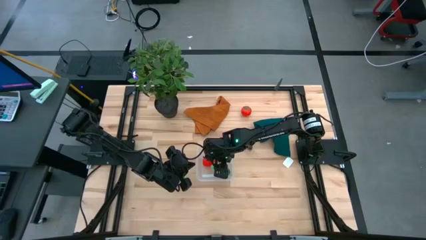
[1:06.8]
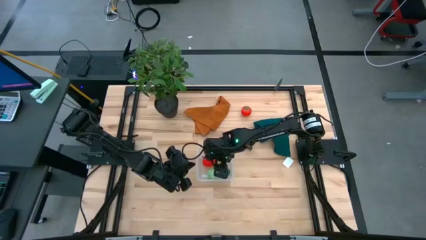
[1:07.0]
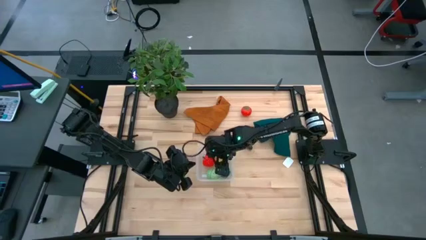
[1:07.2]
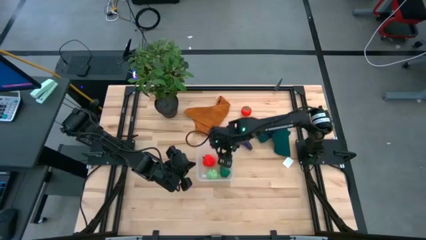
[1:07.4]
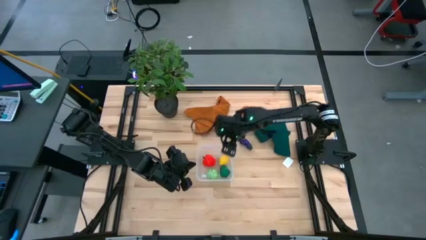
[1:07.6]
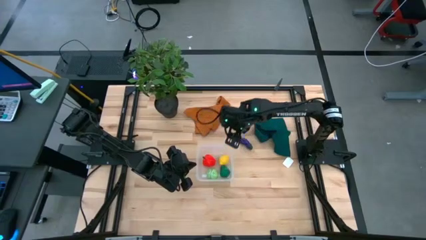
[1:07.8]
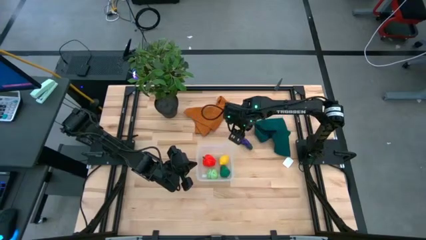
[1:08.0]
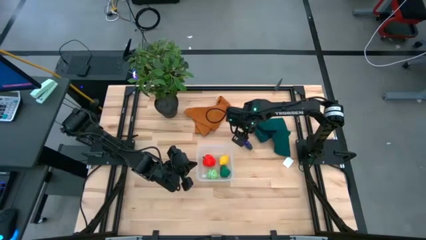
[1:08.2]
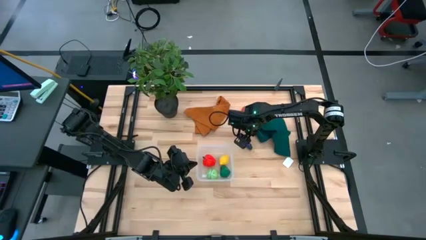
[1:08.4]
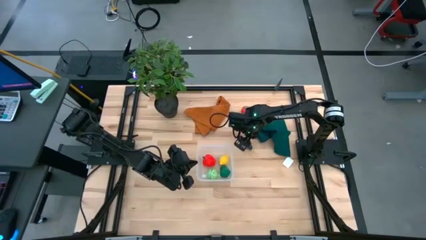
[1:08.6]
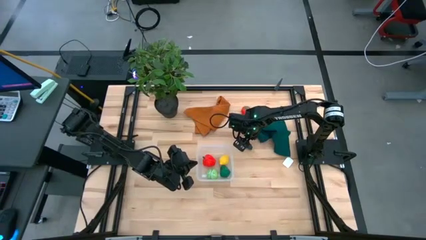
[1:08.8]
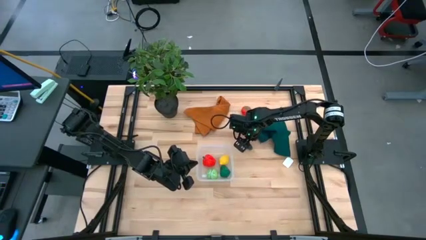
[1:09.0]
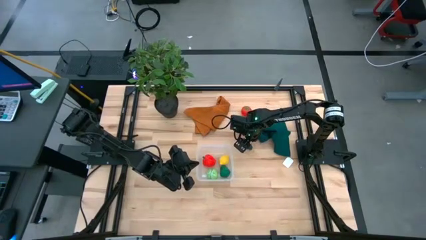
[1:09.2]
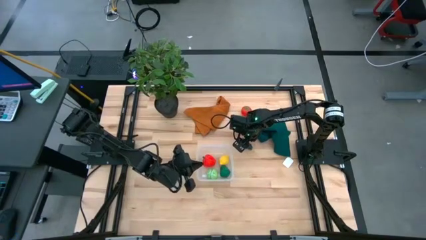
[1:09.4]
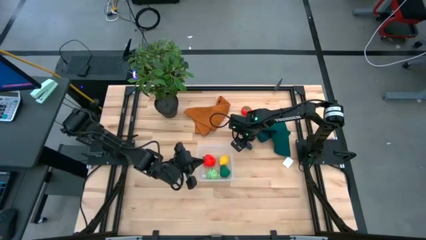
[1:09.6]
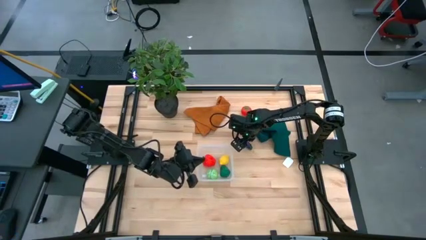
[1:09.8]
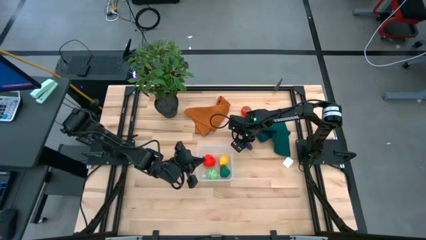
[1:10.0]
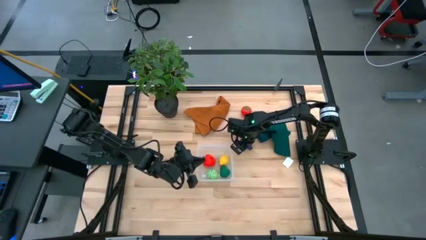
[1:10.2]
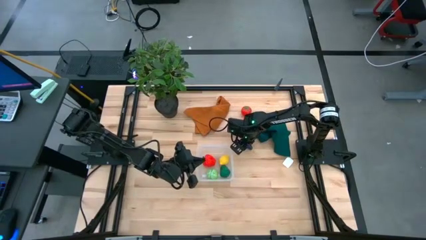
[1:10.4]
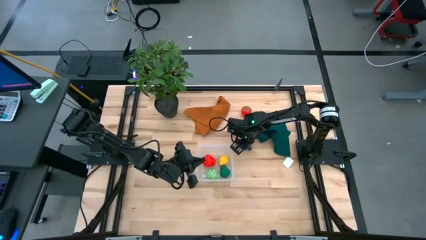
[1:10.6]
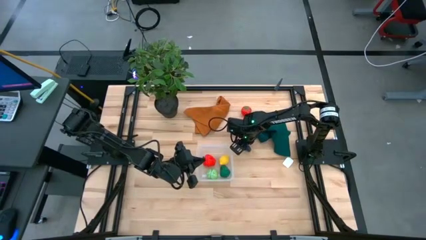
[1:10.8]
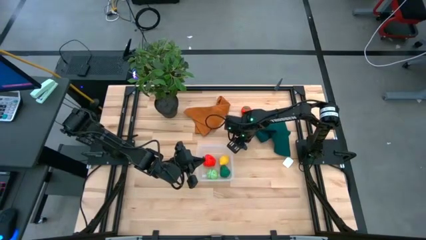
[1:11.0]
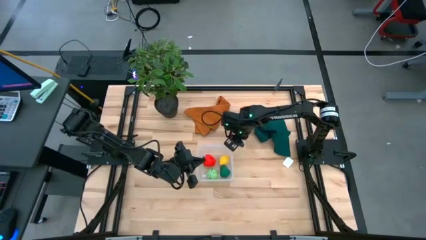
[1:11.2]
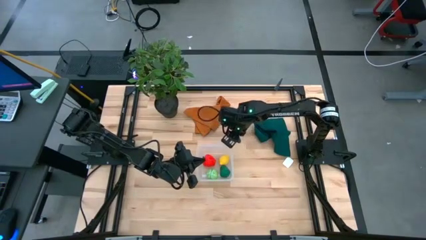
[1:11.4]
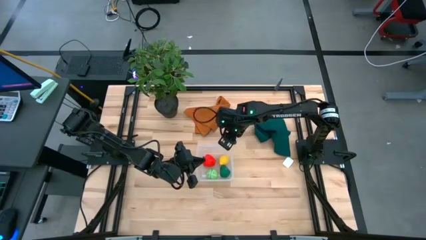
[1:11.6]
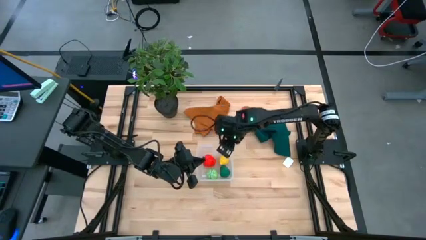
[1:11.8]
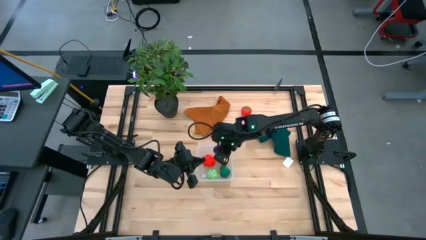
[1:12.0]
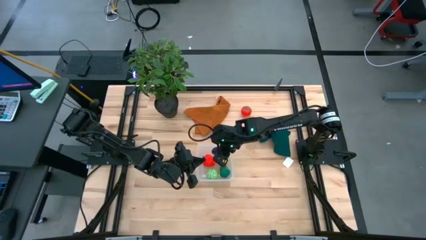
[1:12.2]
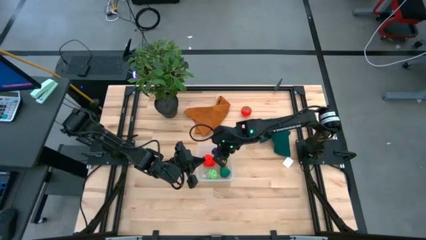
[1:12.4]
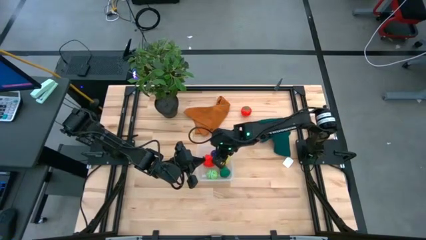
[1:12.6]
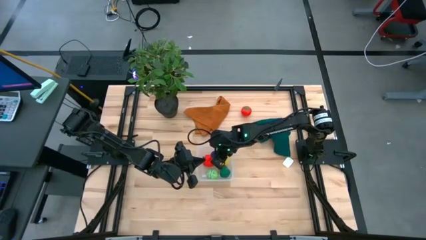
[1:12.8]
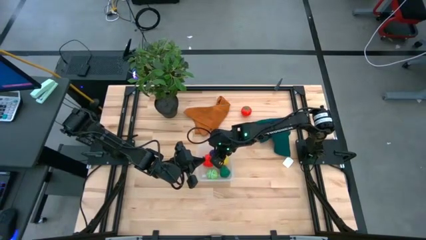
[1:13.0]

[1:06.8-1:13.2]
Task: Pick and placing Produce into tupperware
Put the eggplant into the transparent bin

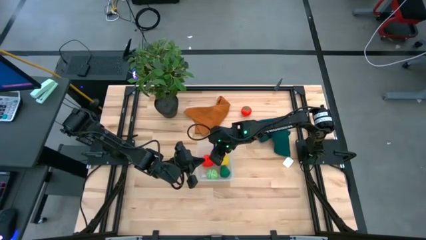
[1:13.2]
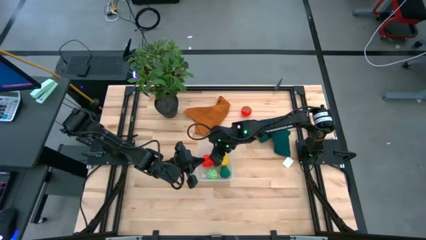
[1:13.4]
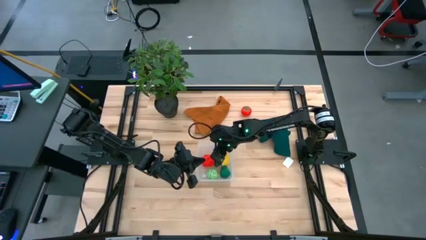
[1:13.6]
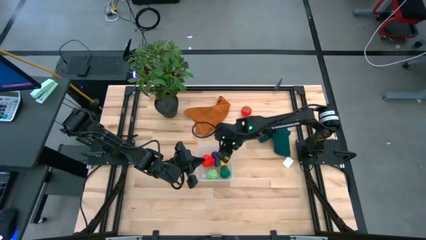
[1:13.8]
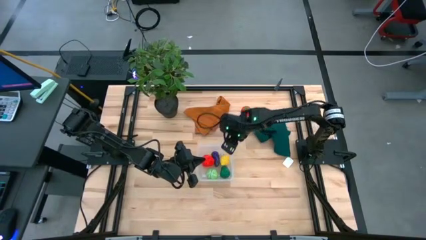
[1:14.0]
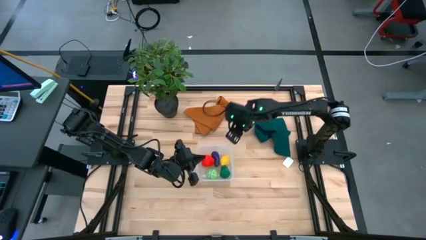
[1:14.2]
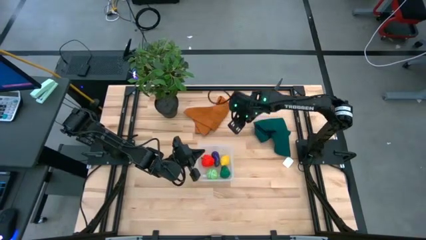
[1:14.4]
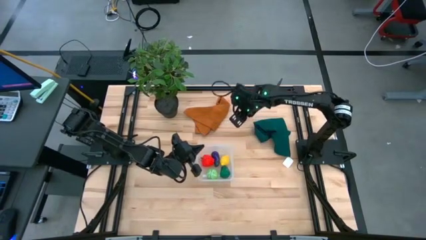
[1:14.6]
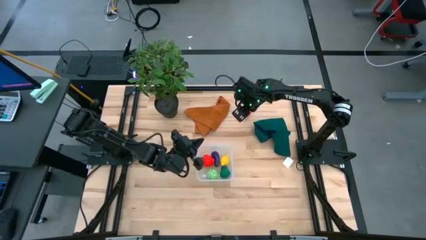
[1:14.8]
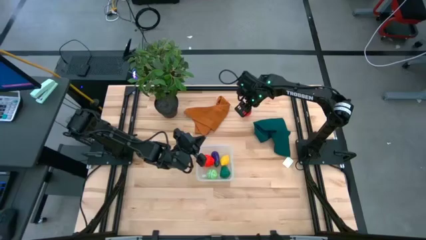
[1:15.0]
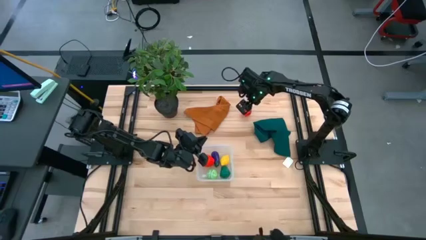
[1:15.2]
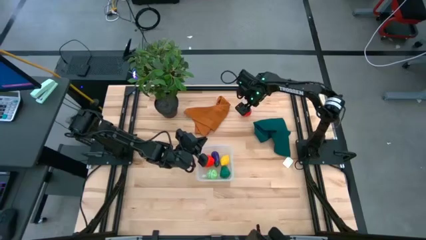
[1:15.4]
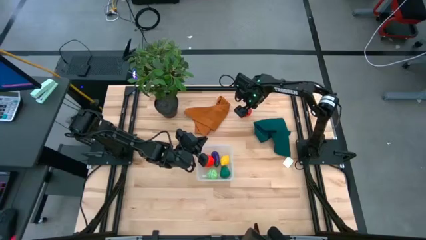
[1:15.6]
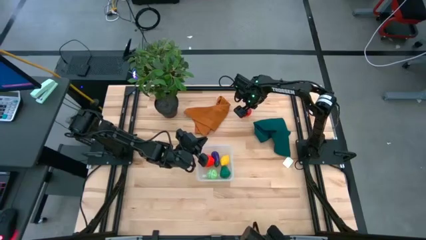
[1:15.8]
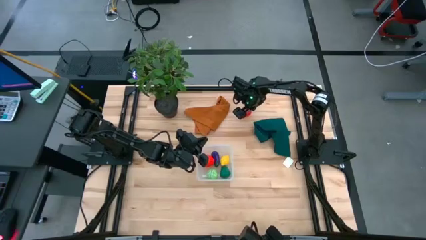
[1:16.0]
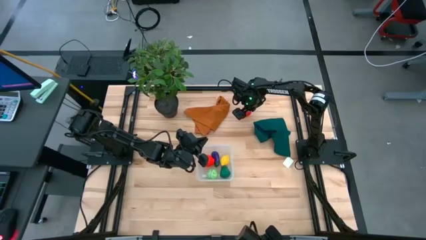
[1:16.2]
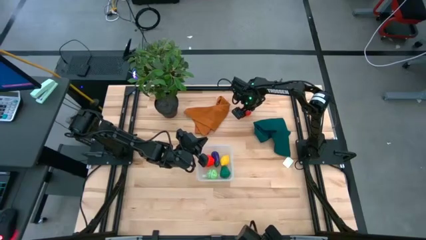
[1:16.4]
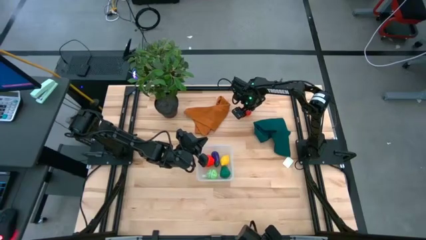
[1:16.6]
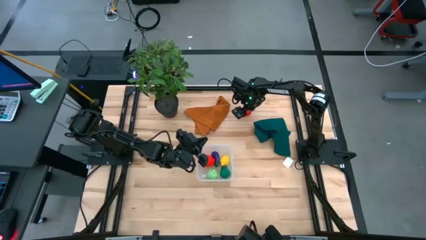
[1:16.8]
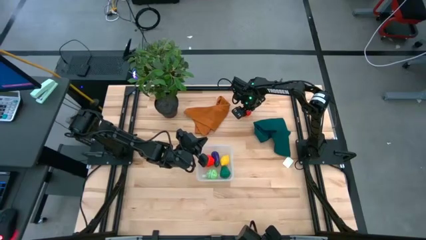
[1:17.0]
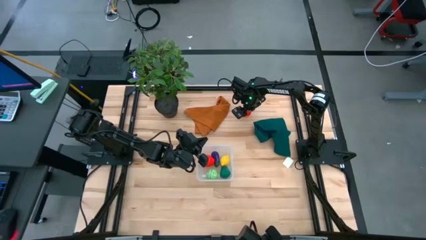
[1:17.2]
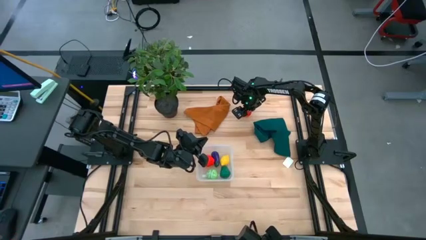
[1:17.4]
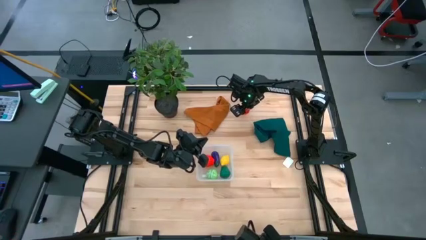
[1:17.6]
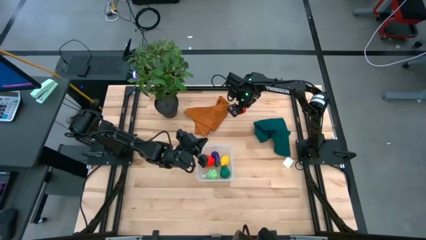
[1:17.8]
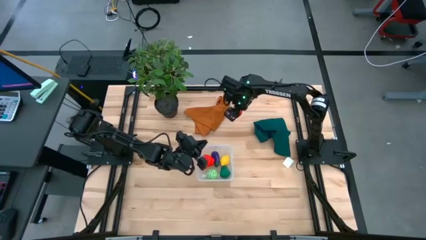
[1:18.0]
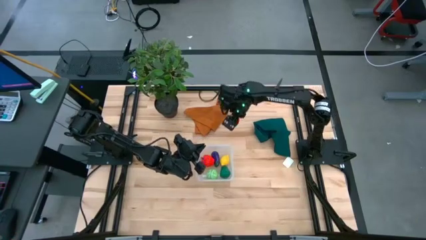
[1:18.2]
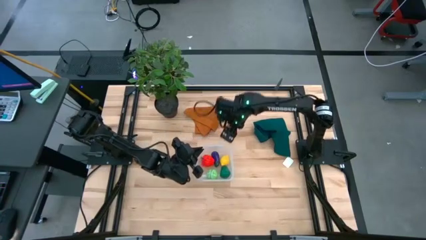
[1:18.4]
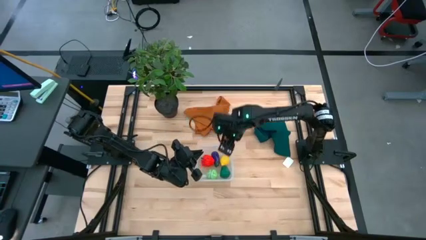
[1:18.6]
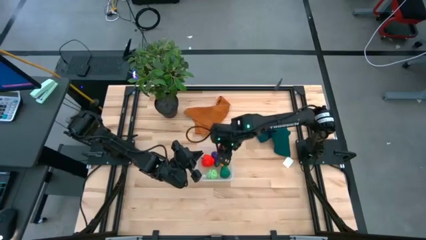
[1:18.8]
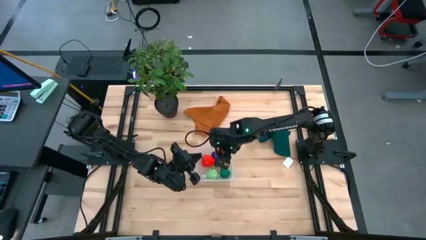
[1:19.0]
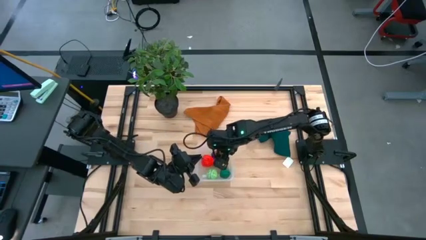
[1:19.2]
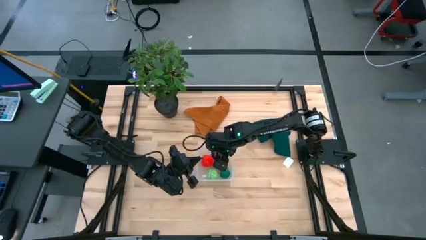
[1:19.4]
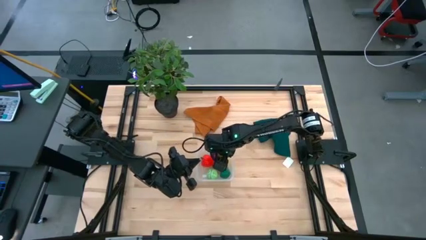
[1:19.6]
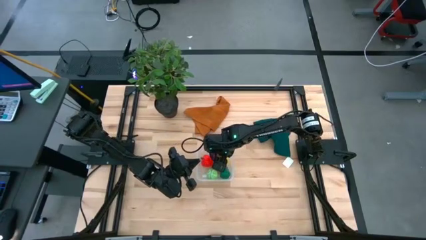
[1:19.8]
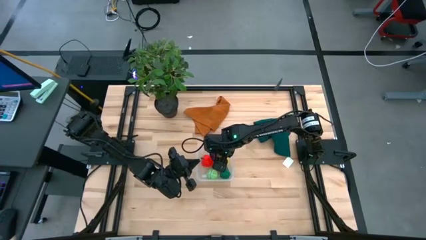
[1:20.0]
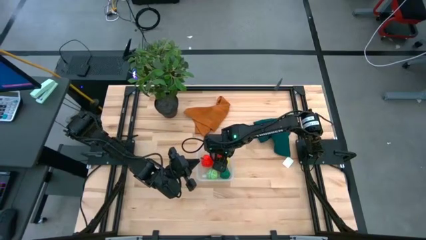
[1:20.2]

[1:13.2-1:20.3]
Put the tomato into the transparent bin

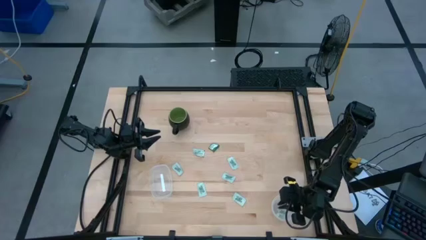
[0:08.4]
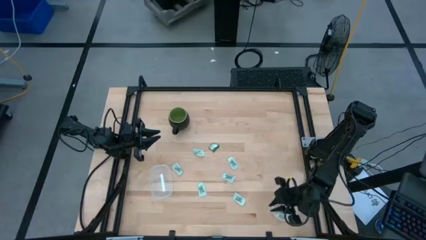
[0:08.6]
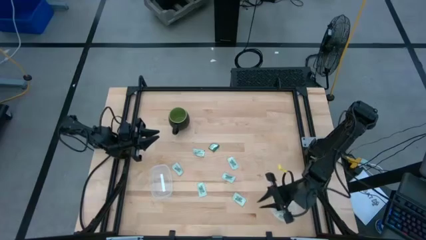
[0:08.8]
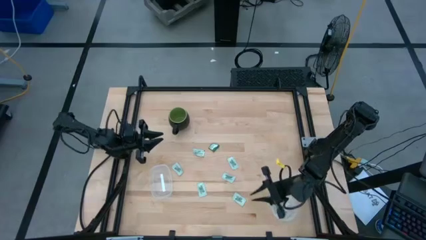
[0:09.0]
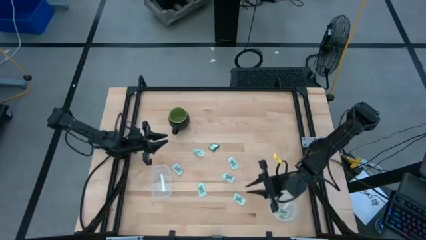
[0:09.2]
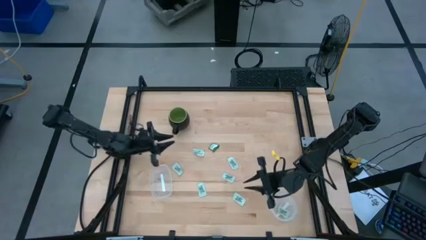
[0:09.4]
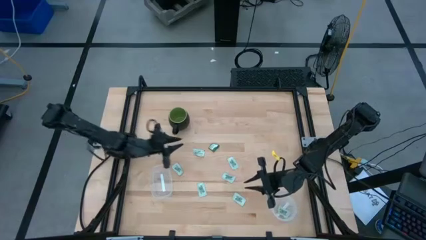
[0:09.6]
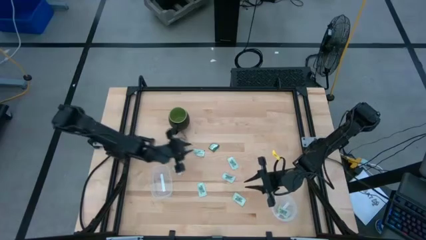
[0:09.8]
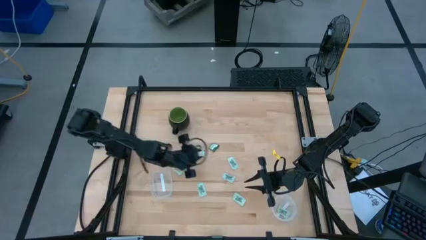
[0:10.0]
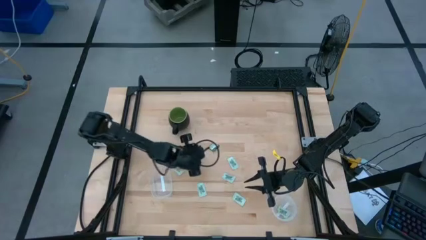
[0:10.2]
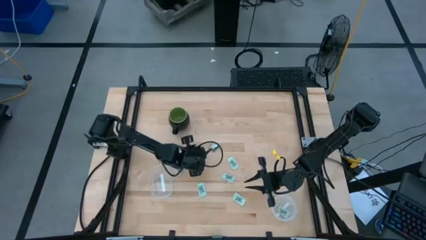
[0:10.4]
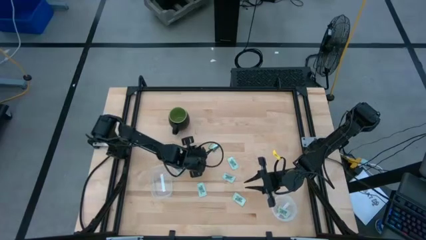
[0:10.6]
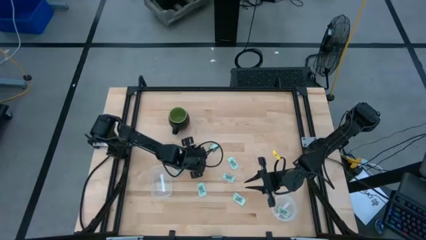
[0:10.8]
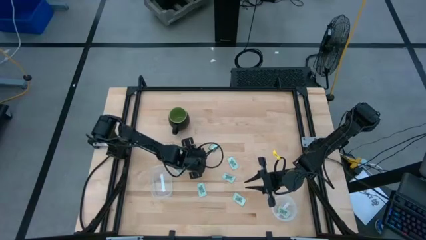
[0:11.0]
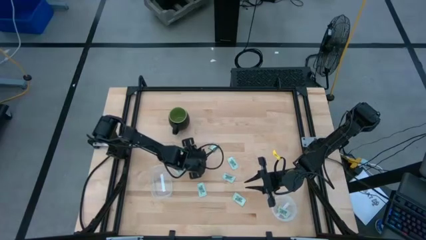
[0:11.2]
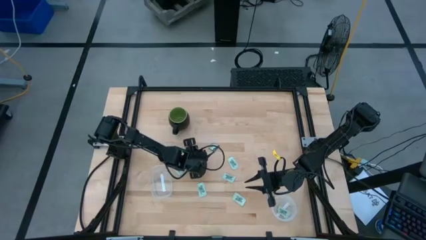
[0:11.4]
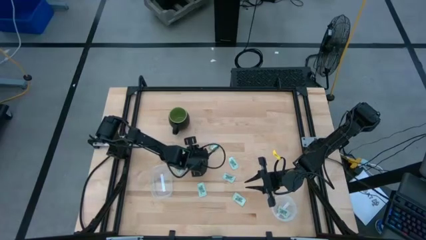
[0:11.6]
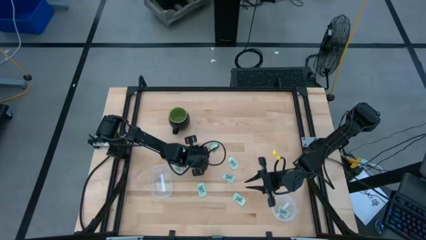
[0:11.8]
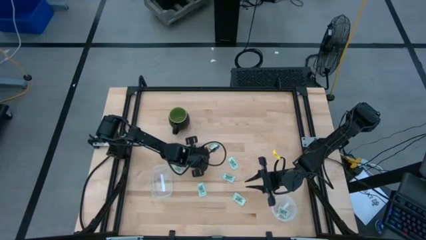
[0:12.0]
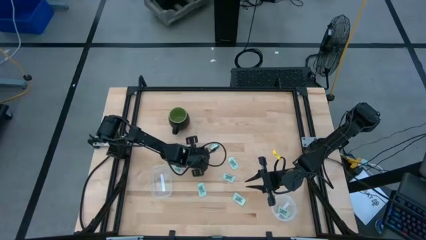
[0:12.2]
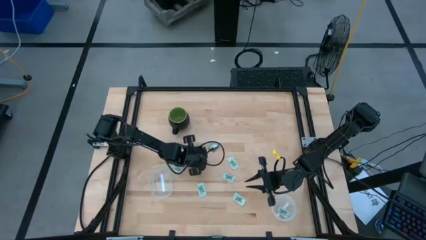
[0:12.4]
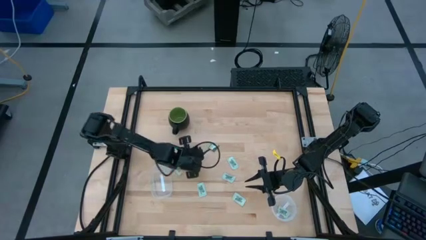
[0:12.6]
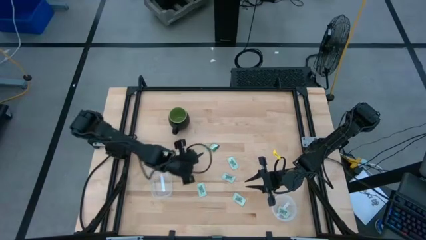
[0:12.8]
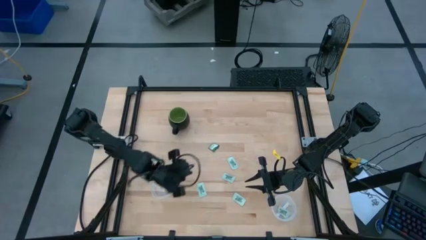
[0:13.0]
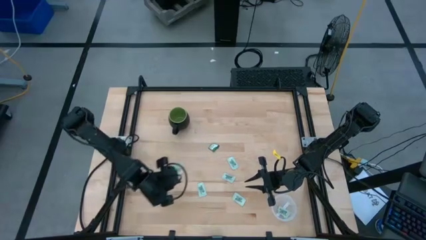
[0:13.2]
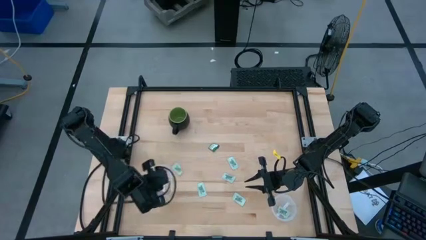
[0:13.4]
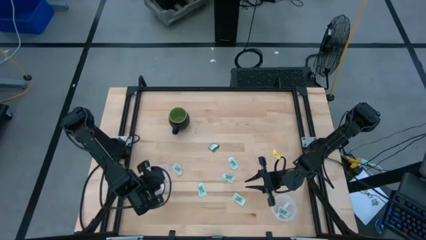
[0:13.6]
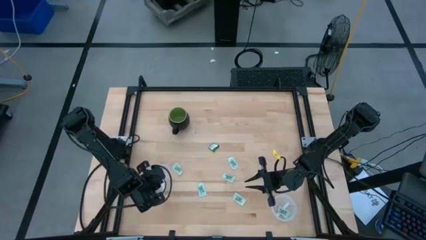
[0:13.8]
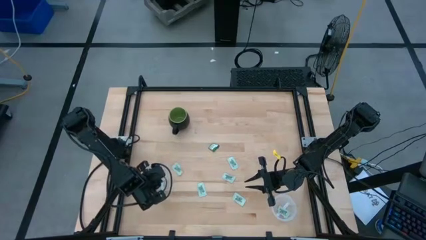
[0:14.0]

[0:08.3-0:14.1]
Task: Pick and place Stevia / Truvia into bins
Put the Stevia packet into the top left transparent container
